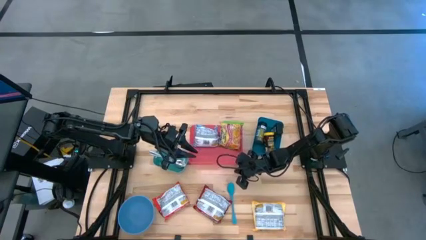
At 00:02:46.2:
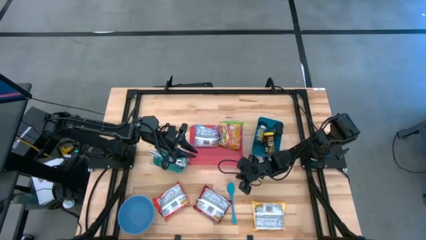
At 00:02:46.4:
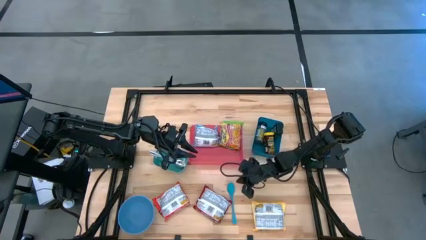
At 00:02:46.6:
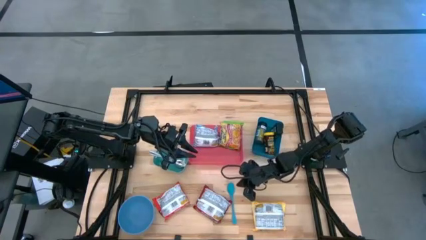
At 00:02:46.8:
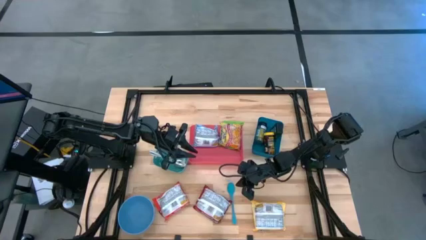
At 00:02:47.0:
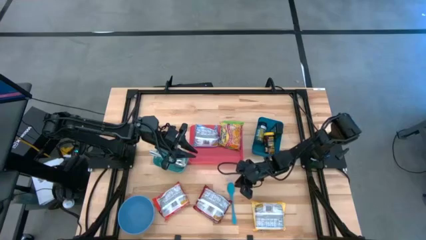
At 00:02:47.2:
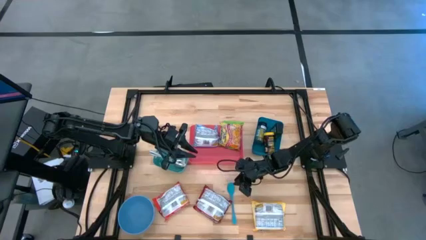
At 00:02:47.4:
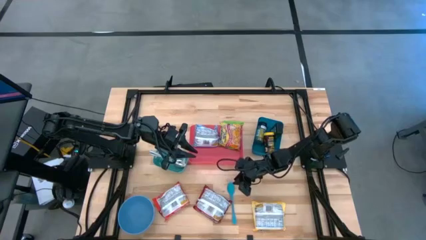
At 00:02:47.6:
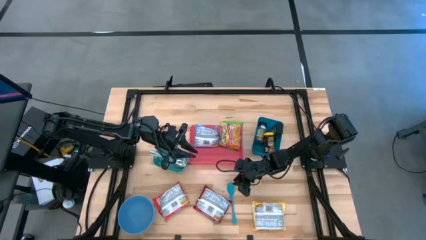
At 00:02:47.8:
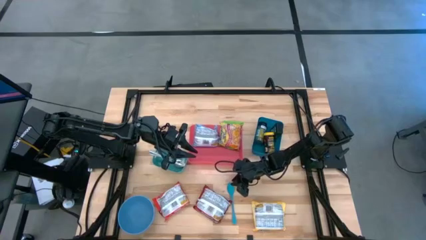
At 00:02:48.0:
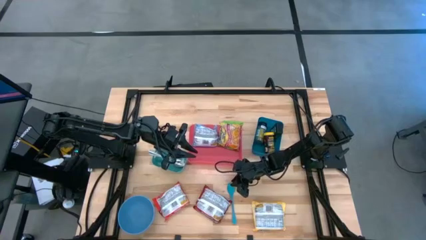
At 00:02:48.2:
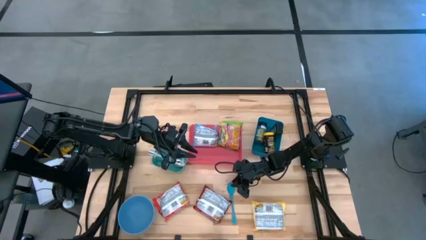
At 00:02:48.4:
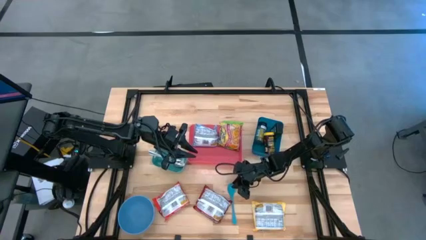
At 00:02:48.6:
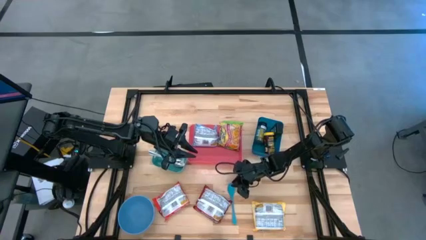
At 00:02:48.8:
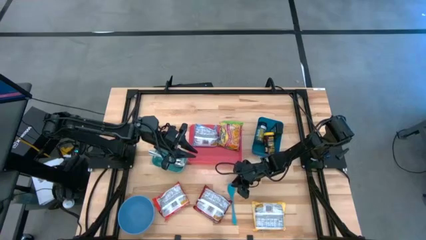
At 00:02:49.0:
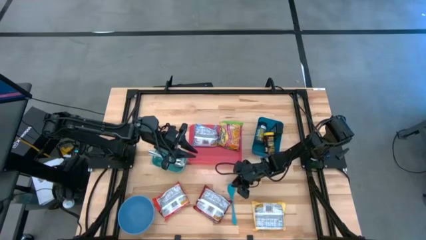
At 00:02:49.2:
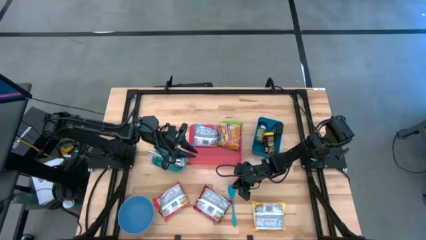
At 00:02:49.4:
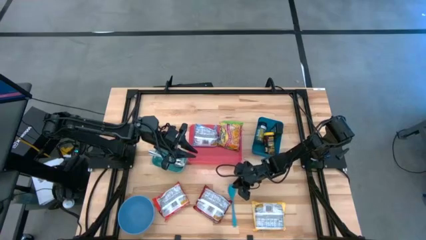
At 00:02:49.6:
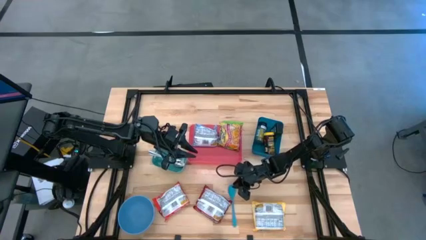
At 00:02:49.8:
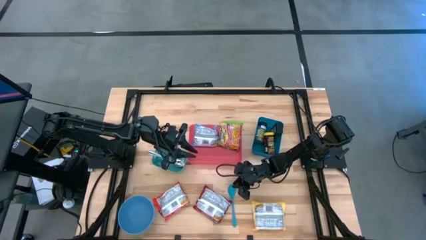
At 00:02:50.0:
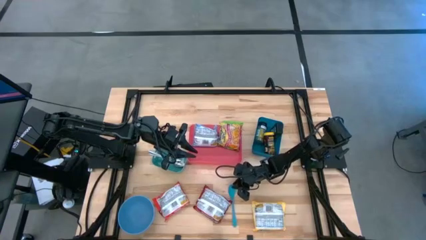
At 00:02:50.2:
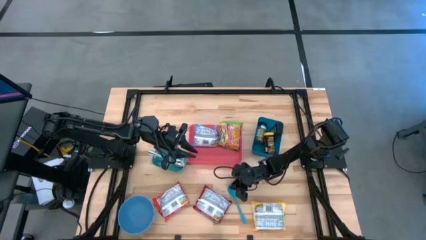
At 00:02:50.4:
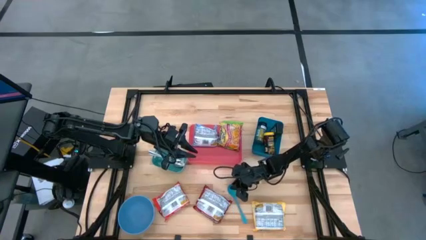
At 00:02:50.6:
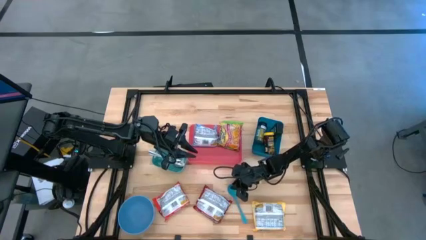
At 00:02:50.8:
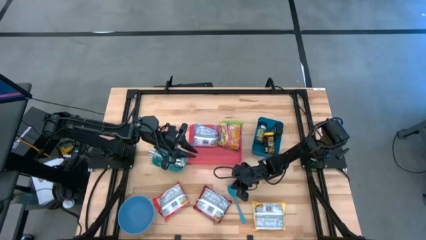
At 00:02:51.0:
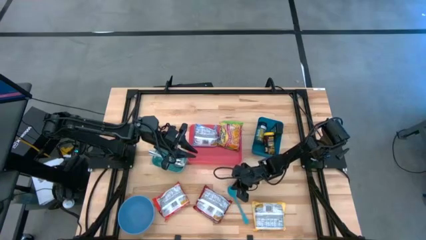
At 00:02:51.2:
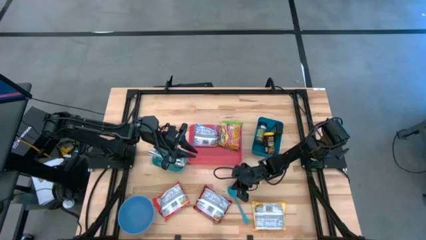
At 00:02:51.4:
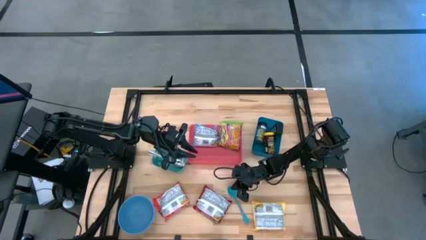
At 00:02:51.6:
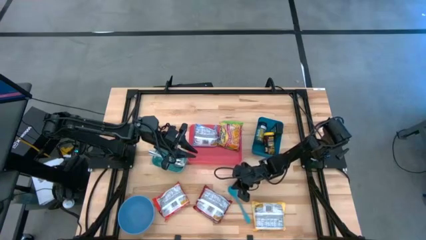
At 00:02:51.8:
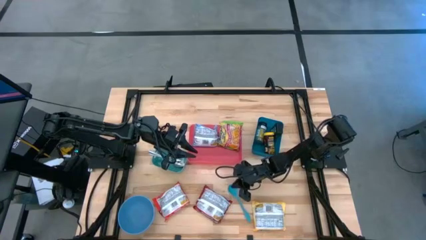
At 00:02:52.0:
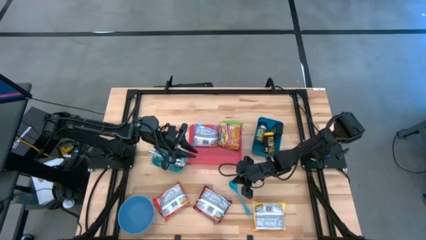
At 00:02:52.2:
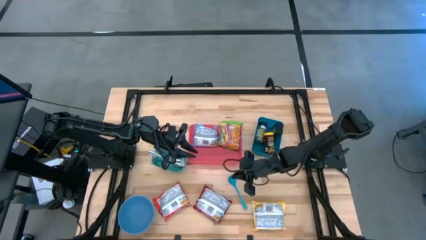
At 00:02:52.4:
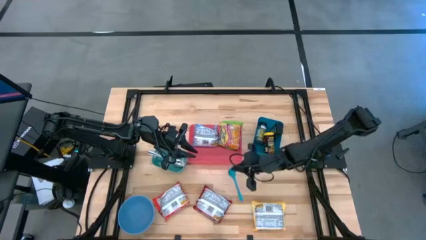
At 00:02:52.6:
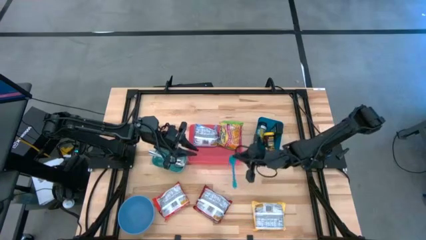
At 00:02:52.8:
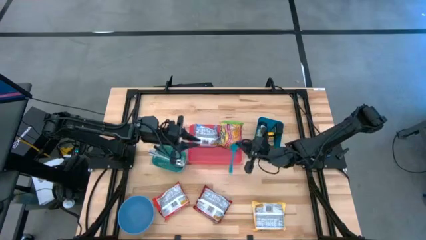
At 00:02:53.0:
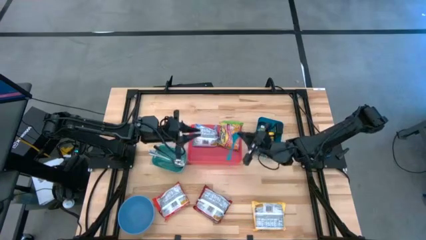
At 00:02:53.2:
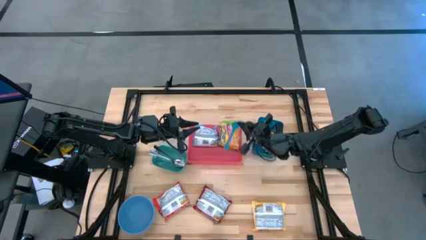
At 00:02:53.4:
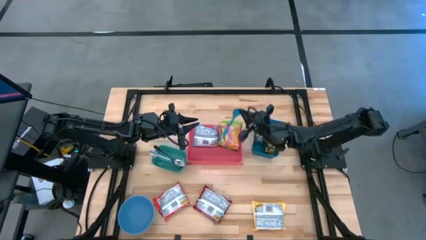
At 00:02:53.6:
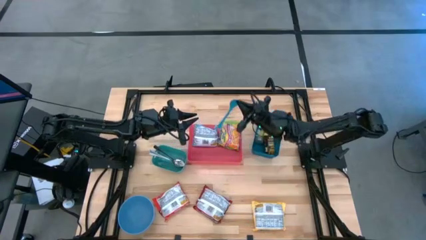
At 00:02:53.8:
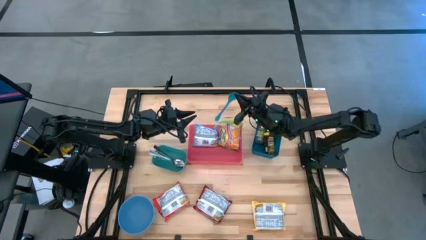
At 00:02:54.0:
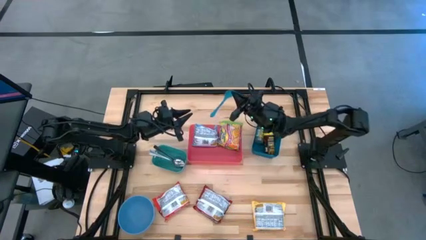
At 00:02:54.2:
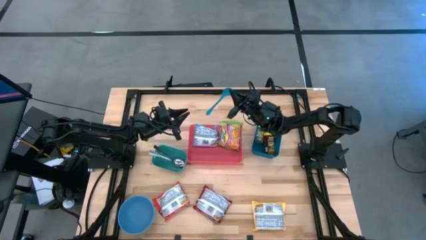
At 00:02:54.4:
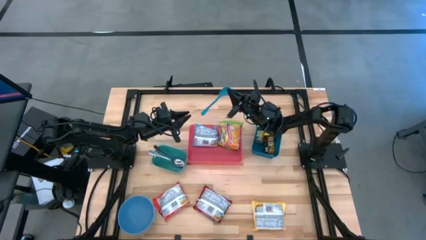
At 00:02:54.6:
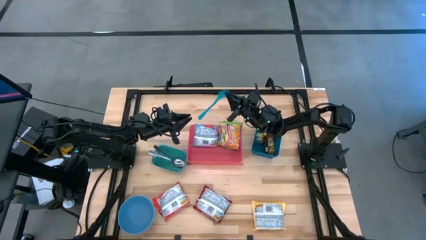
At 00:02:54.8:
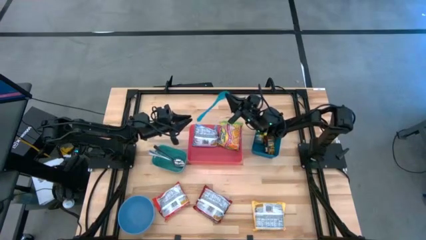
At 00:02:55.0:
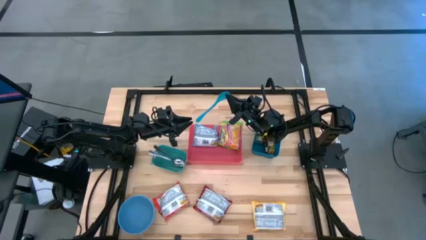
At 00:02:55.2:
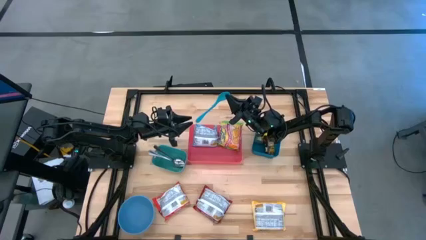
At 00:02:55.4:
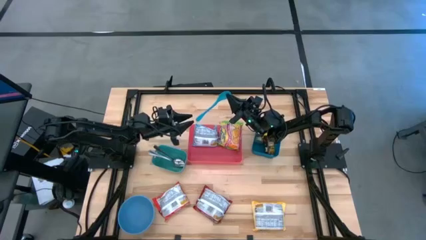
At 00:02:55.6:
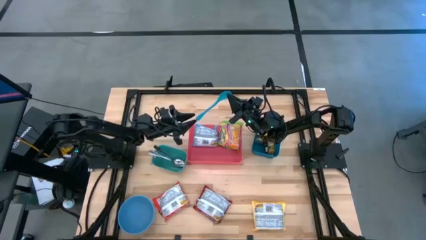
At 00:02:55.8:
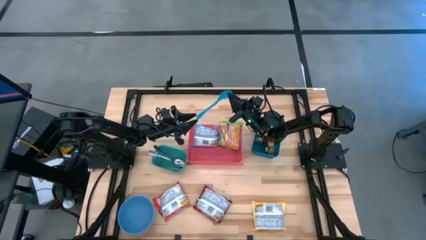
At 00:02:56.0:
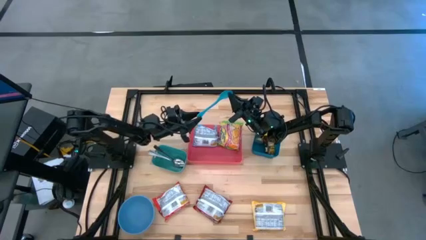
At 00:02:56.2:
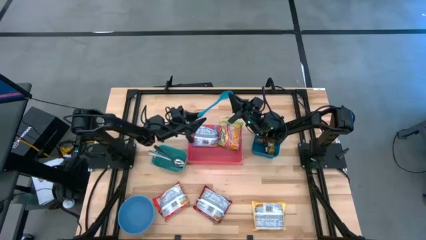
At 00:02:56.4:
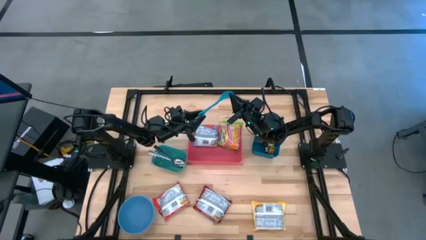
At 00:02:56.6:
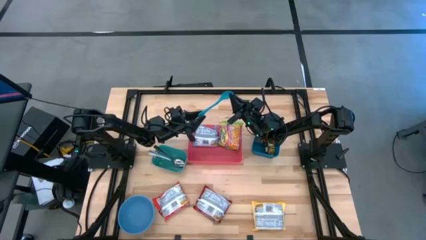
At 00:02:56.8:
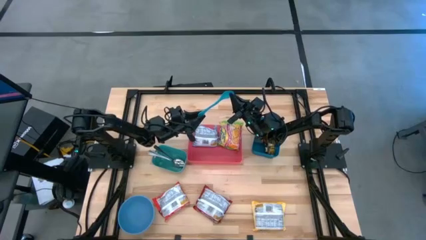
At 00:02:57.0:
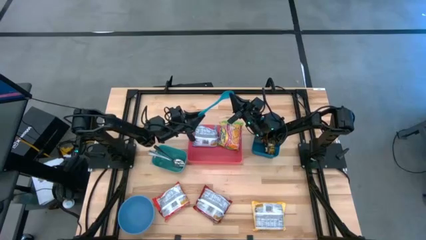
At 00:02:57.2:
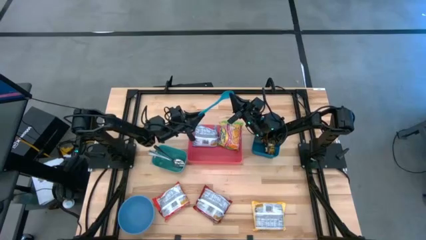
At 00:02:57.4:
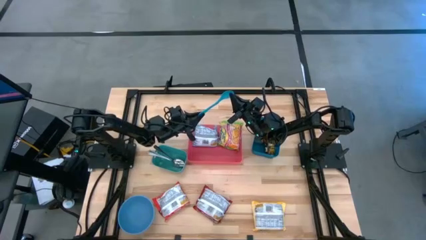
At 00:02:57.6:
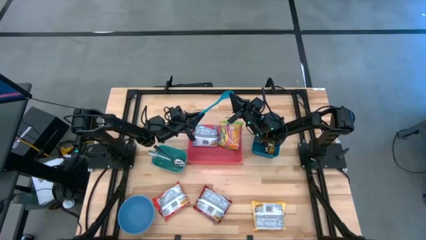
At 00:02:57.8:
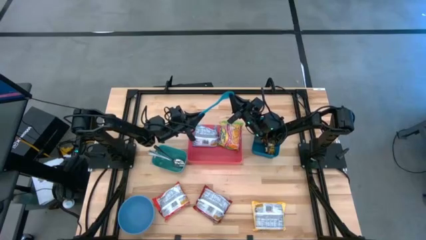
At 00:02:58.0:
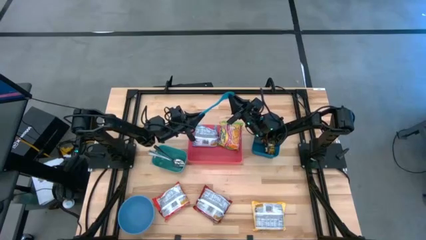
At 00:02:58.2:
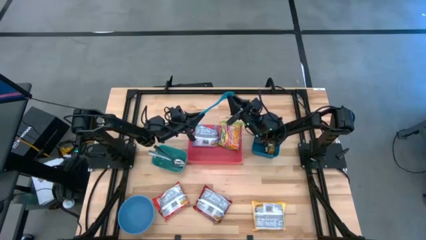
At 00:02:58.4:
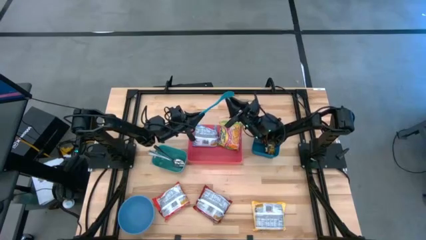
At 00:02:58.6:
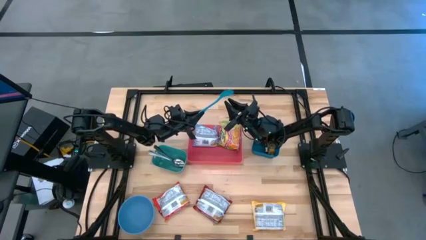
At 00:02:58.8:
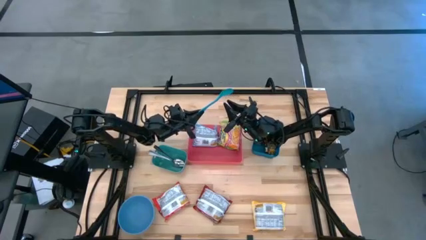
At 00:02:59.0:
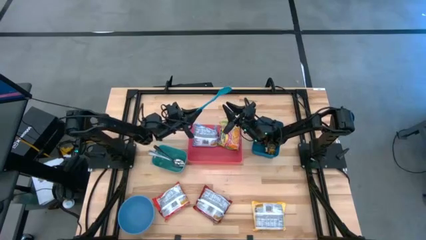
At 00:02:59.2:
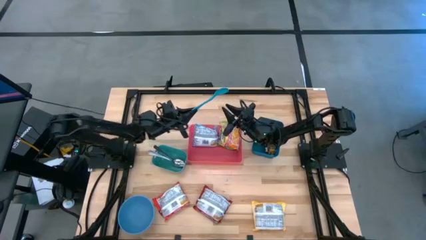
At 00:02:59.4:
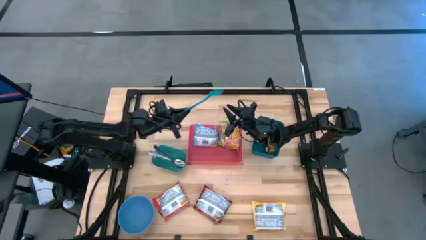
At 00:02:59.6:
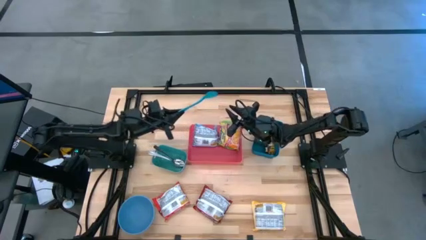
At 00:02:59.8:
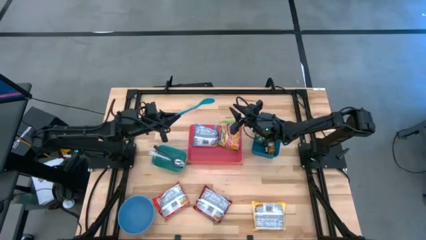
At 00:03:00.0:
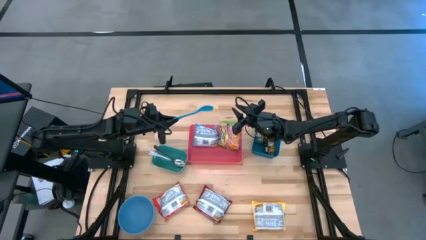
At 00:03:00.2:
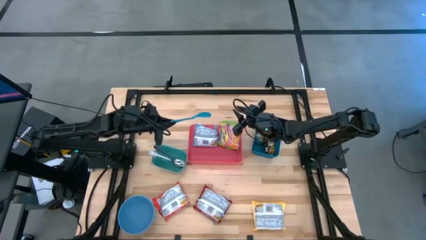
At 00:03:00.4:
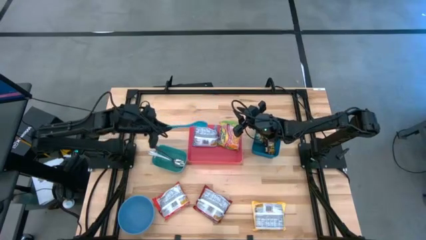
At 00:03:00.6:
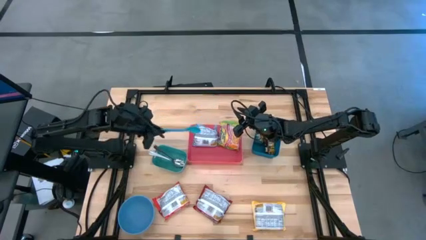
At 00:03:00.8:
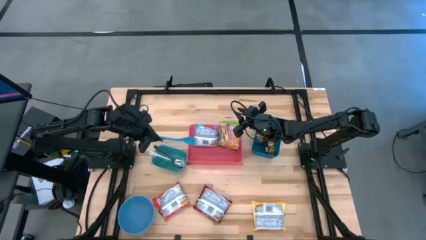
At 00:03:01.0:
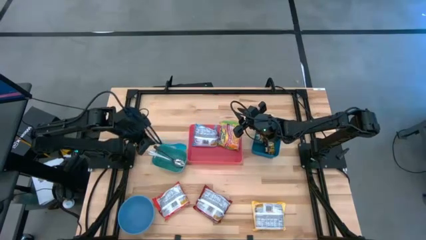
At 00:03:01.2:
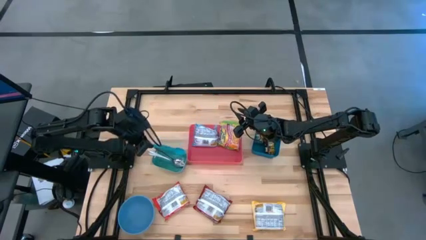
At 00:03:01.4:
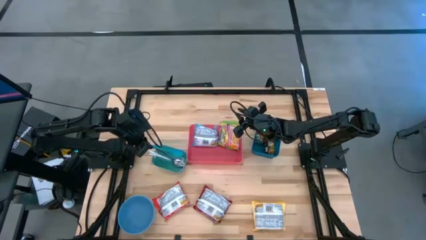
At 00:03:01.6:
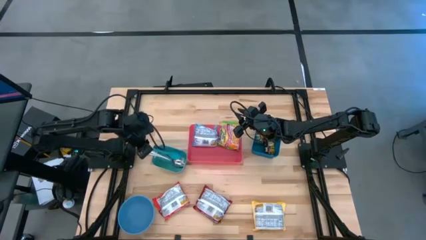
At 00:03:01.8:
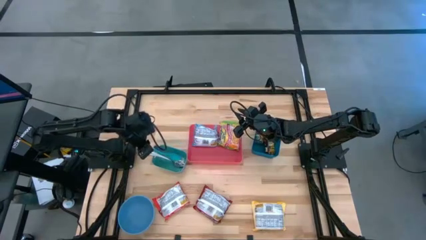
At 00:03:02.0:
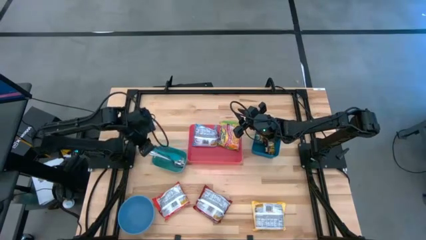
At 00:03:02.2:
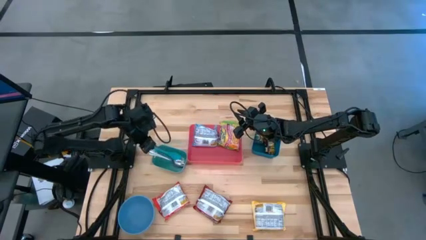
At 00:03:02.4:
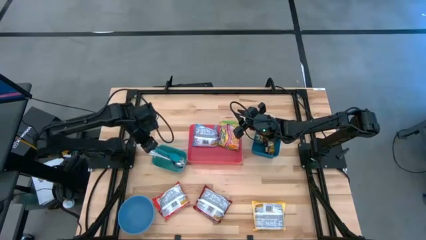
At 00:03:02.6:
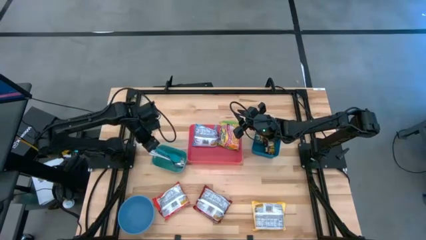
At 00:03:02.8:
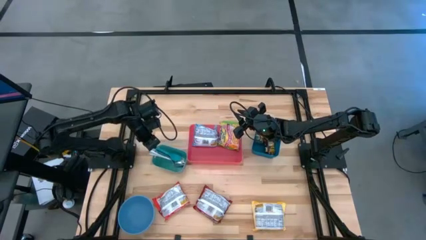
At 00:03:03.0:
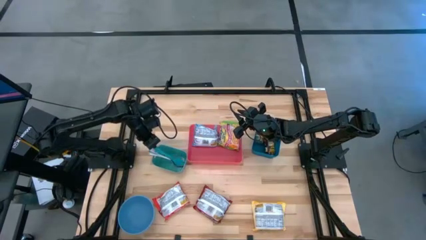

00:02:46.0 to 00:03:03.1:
Task: Pick & Place Food Item
Put the blue spoon into the green bin
